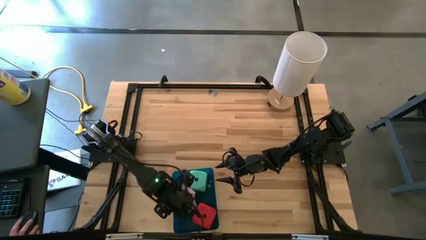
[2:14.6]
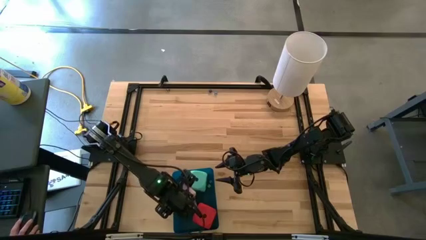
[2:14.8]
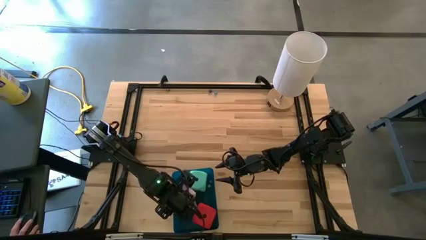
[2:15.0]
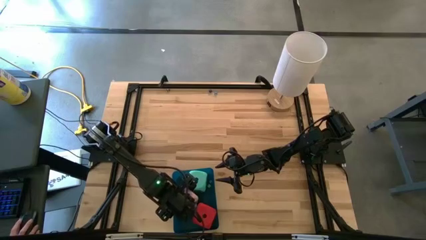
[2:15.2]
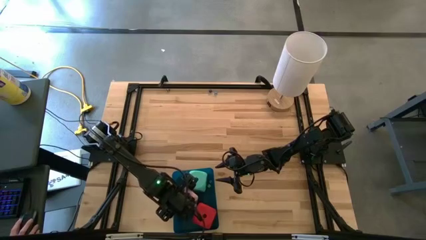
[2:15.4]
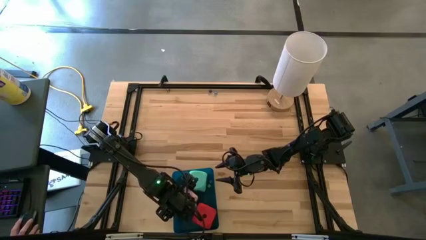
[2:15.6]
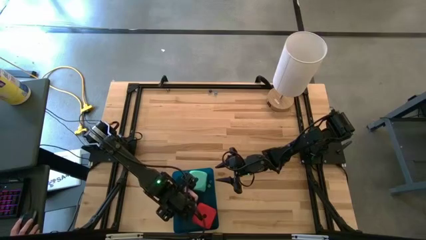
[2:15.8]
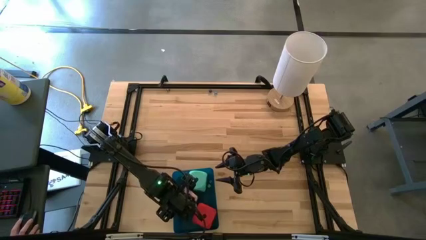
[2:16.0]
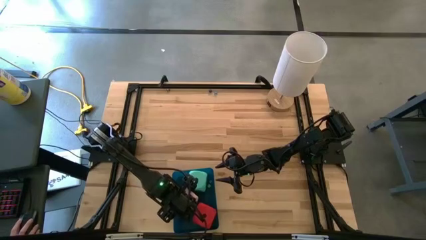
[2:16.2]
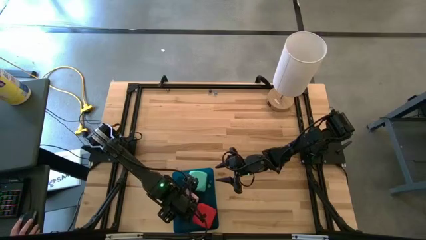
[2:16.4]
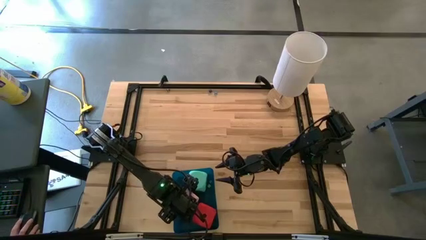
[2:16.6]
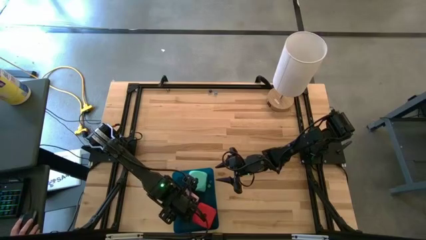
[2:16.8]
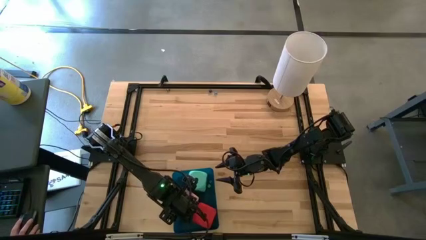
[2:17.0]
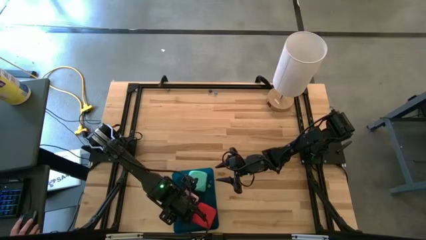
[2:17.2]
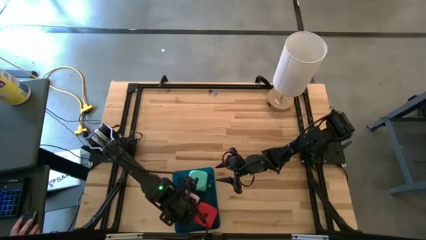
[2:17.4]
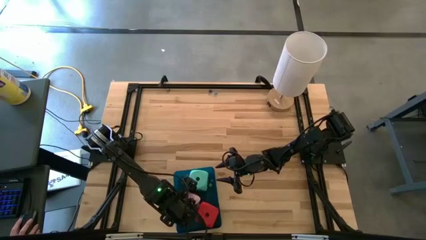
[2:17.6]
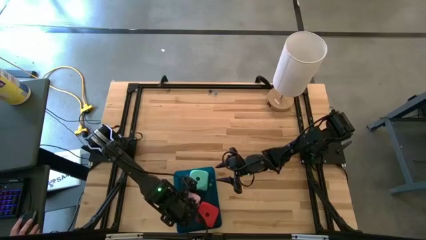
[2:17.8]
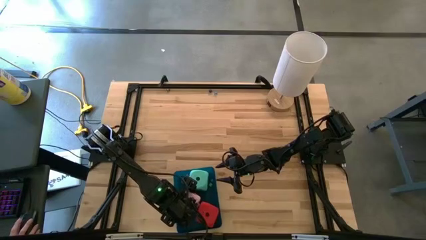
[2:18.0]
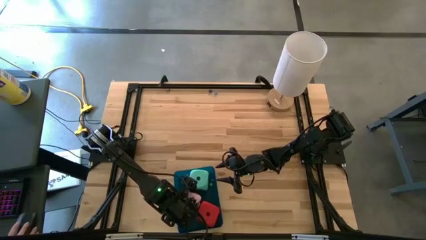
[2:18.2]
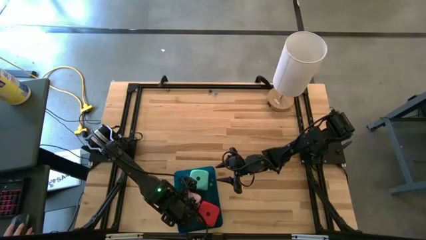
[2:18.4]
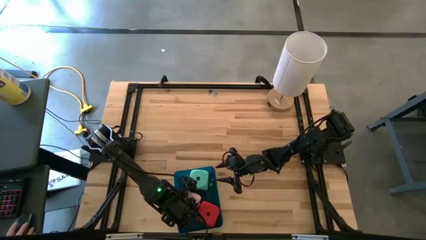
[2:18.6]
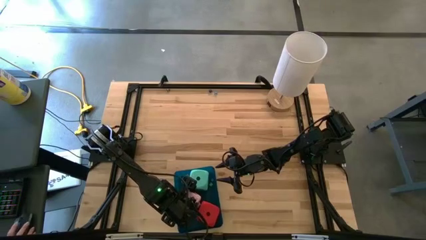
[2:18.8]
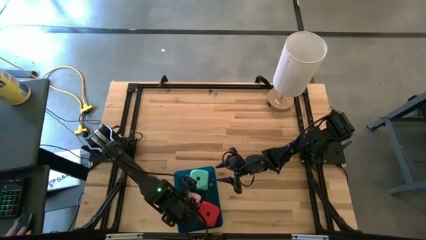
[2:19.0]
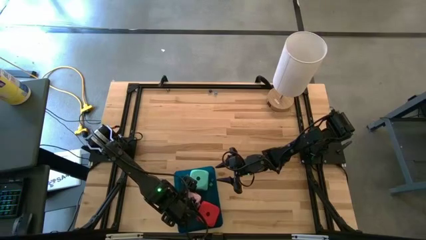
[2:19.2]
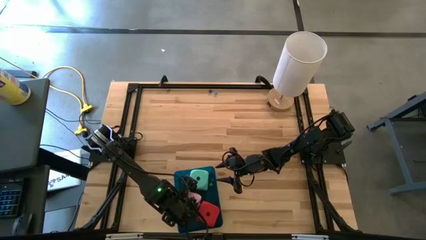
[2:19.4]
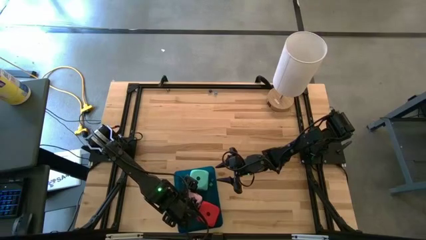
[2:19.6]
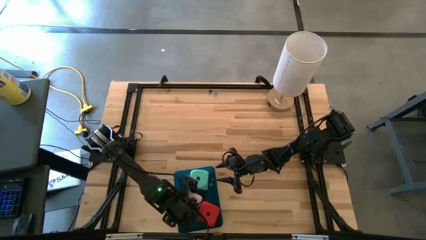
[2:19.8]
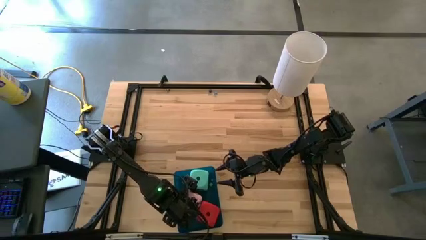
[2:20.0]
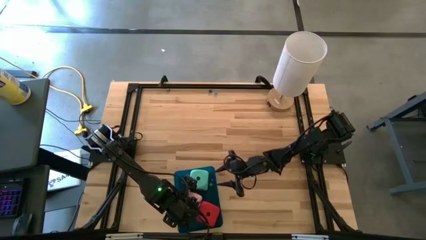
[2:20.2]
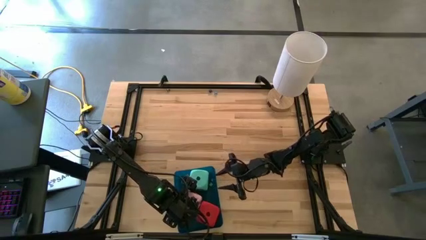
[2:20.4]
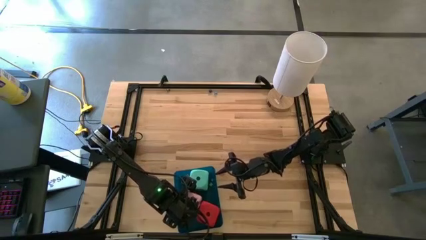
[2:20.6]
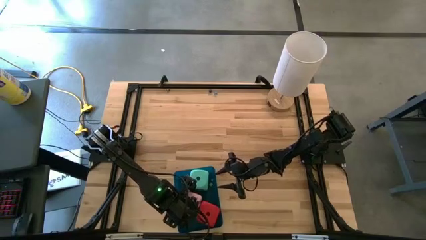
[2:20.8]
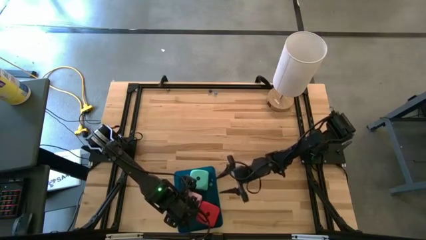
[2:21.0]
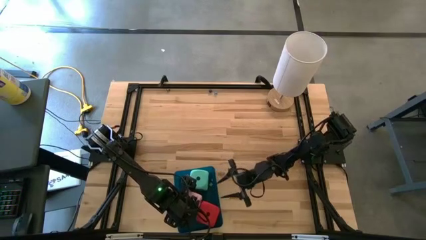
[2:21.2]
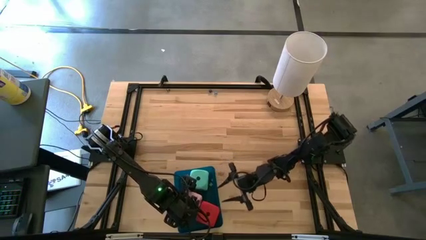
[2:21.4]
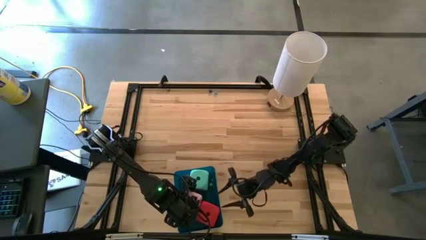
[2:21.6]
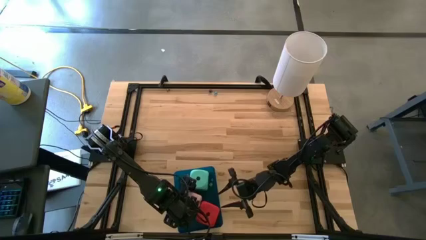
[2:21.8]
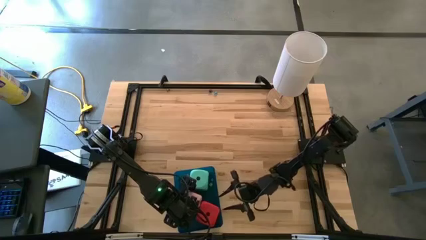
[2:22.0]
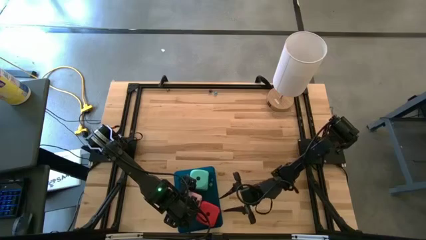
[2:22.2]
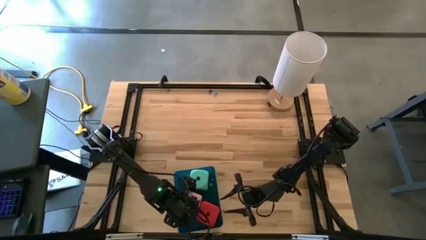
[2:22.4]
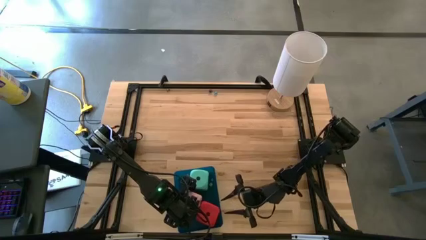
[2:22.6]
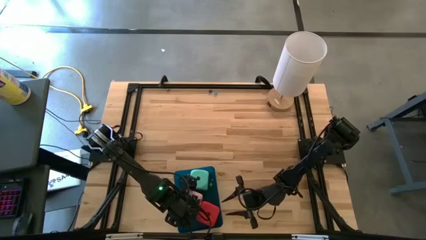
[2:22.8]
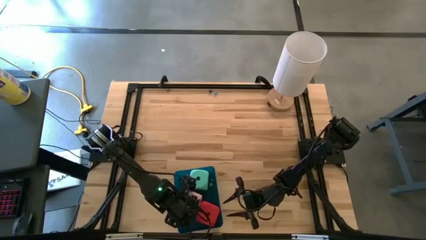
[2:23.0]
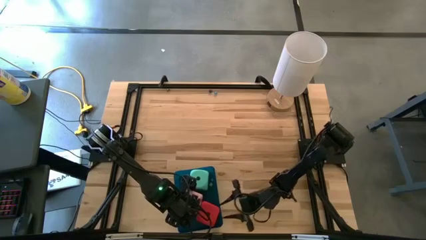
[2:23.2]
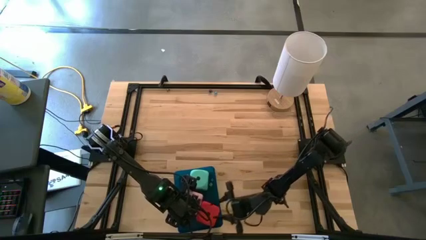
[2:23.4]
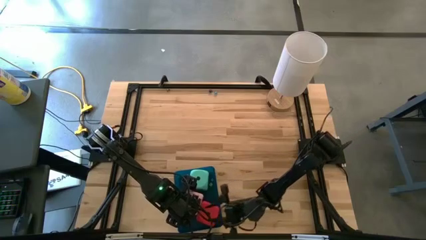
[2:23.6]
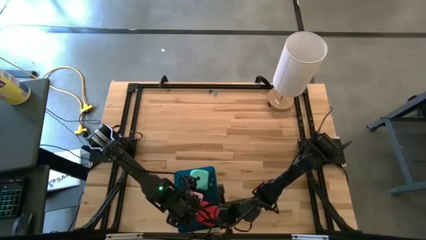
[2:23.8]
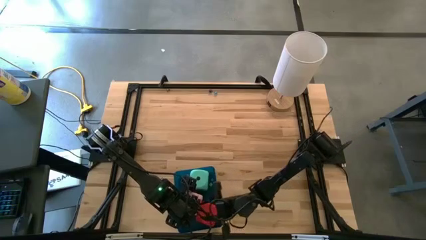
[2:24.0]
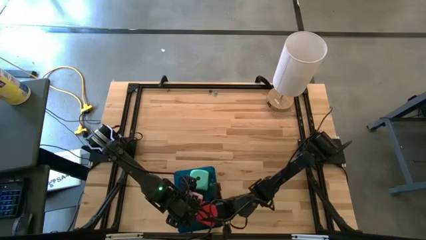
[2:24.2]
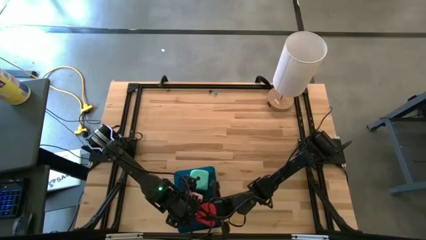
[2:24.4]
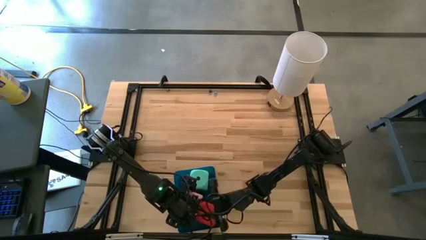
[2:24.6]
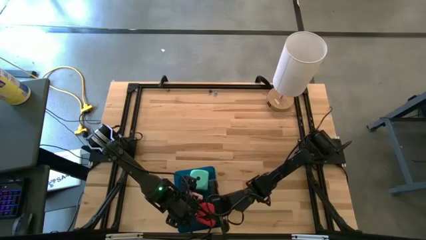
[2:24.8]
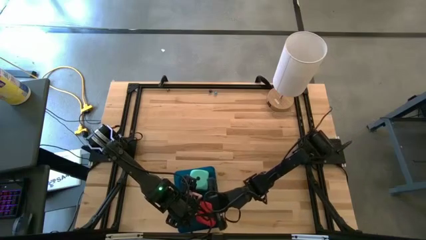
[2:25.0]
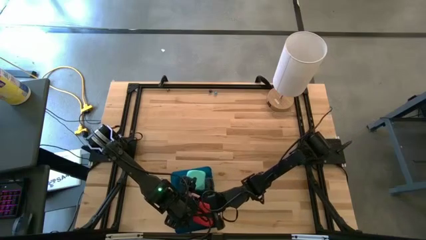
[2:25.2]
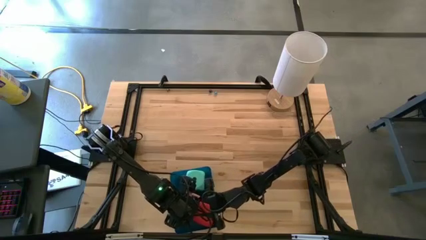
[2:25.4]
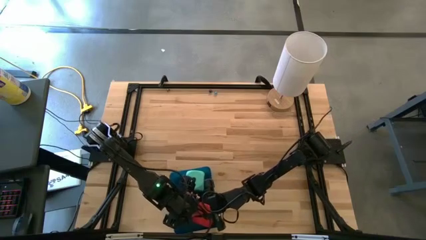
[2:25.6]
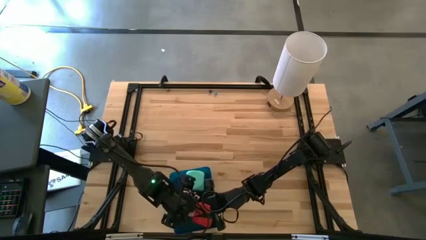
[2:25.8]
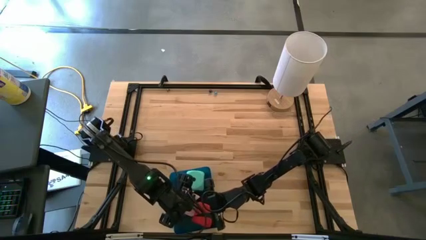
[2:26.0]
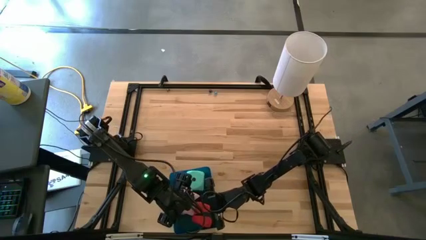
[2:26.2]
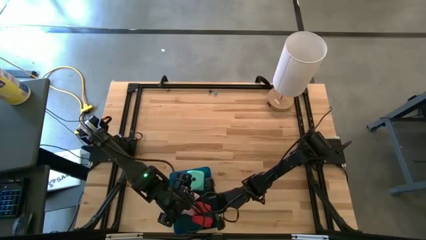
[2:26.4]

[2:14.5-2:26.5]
Task: Pick & Place Dice
Put the big pink die into the blue bin
